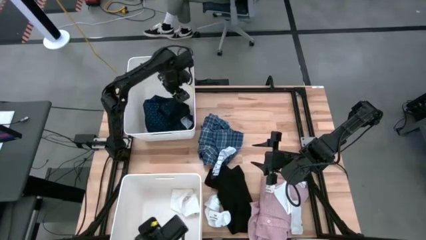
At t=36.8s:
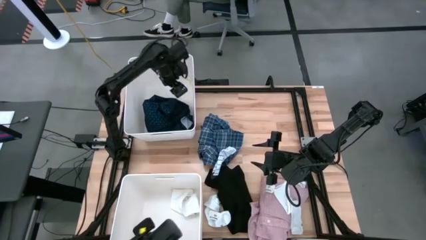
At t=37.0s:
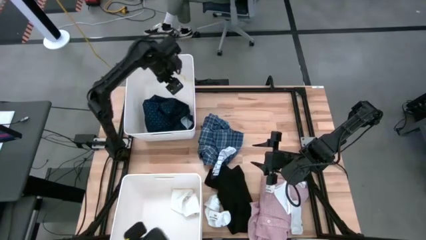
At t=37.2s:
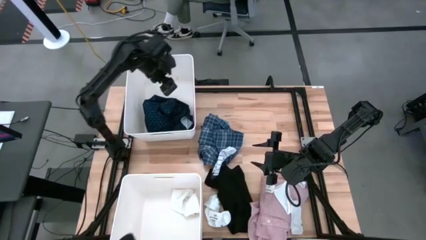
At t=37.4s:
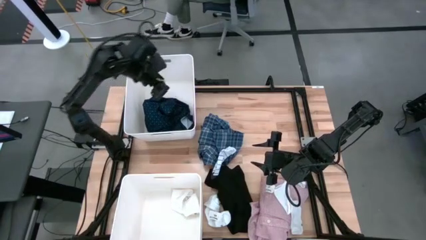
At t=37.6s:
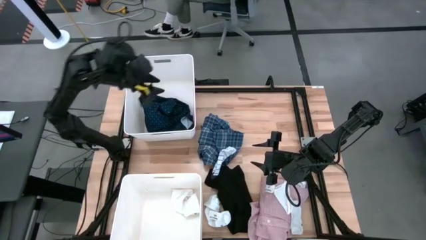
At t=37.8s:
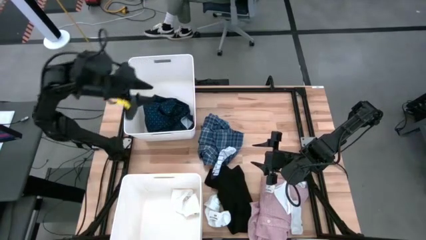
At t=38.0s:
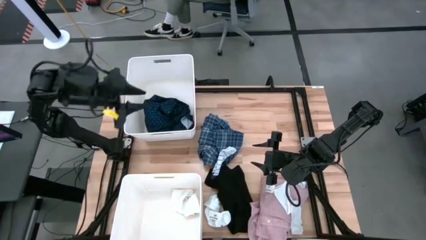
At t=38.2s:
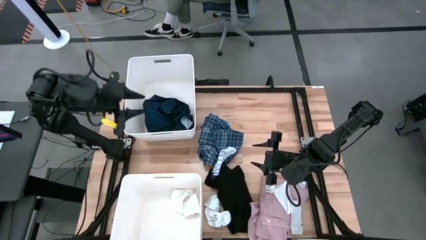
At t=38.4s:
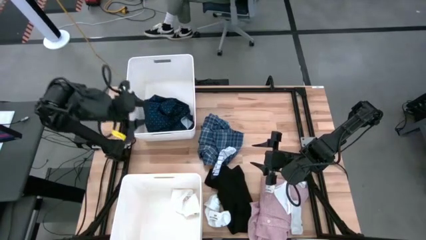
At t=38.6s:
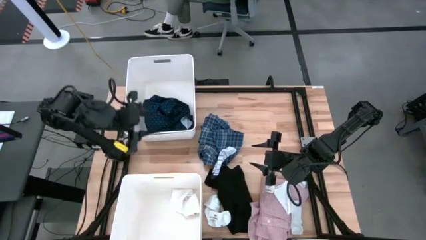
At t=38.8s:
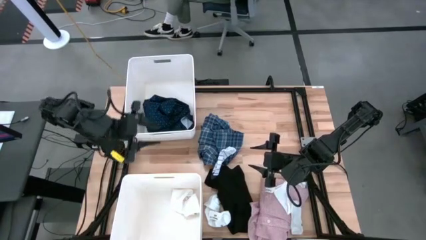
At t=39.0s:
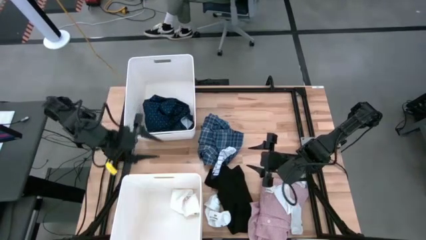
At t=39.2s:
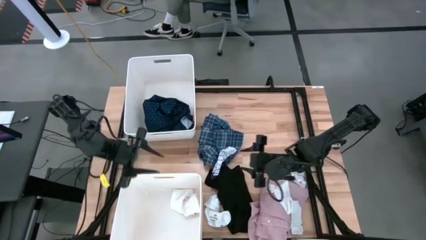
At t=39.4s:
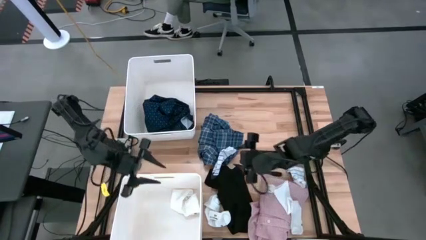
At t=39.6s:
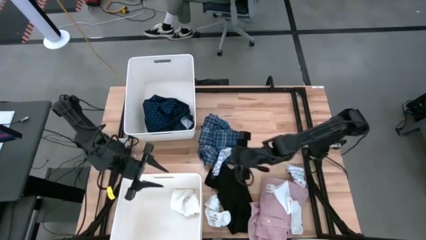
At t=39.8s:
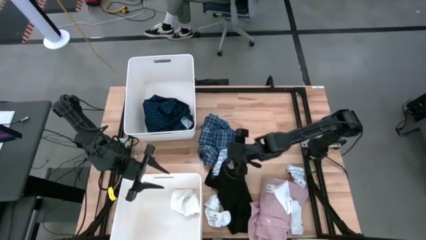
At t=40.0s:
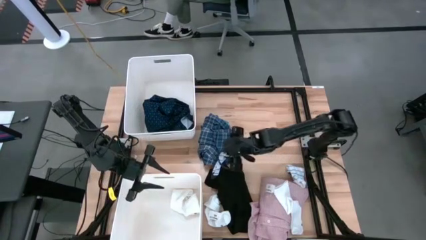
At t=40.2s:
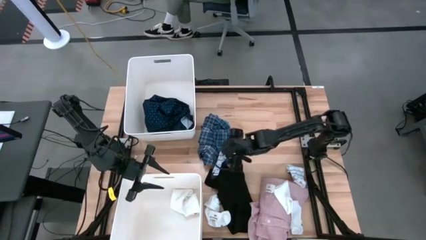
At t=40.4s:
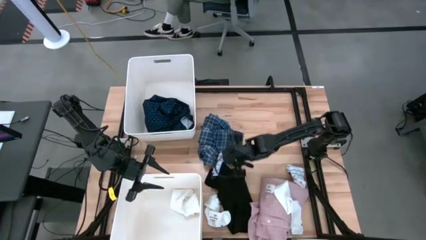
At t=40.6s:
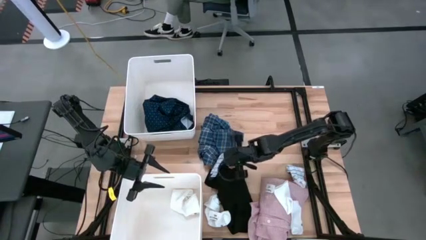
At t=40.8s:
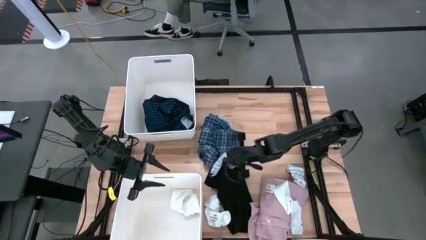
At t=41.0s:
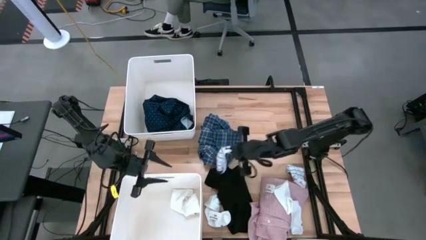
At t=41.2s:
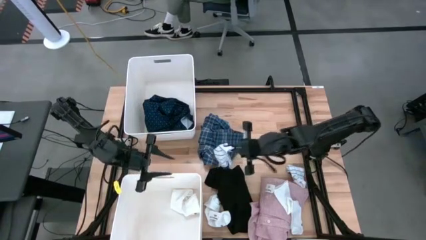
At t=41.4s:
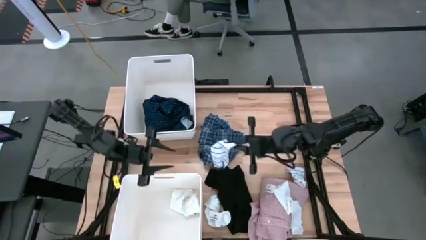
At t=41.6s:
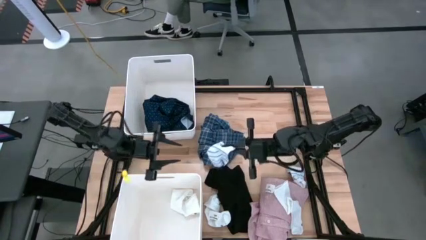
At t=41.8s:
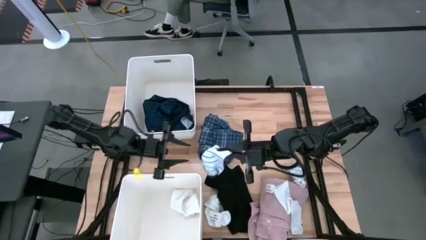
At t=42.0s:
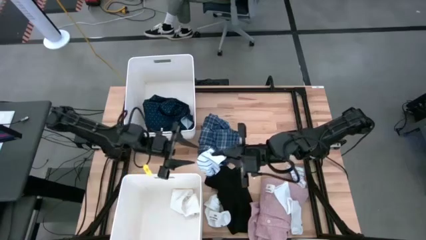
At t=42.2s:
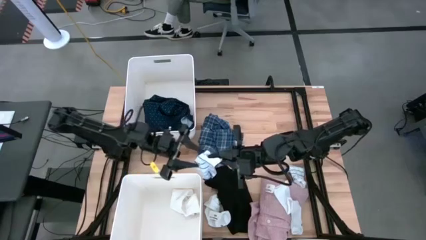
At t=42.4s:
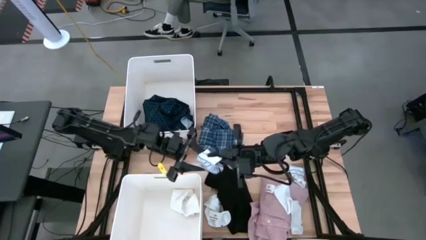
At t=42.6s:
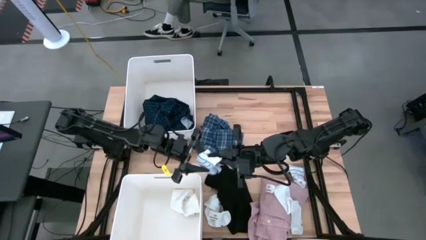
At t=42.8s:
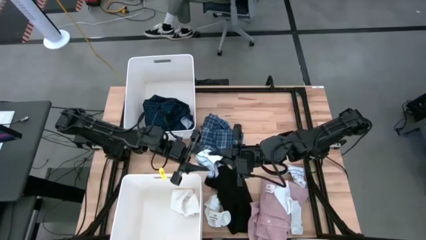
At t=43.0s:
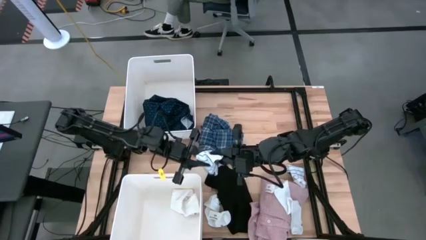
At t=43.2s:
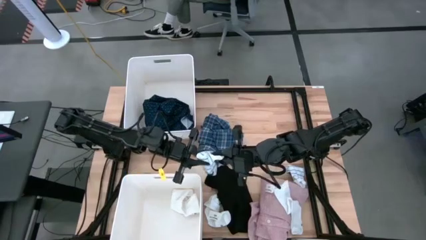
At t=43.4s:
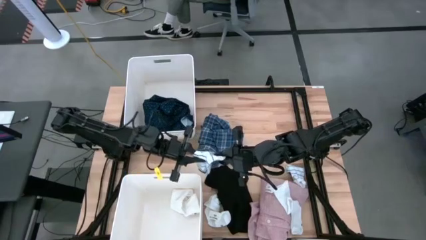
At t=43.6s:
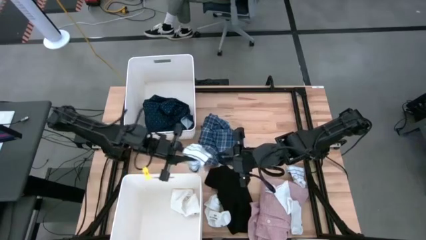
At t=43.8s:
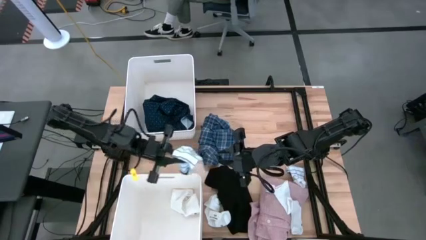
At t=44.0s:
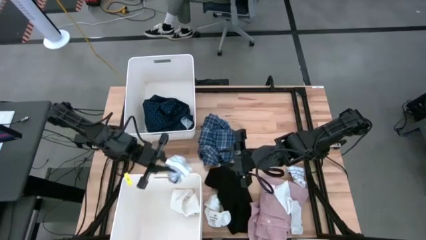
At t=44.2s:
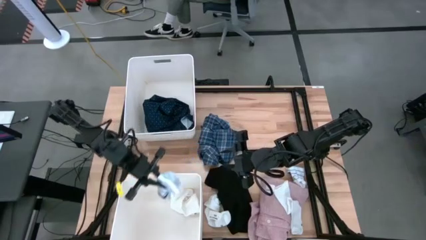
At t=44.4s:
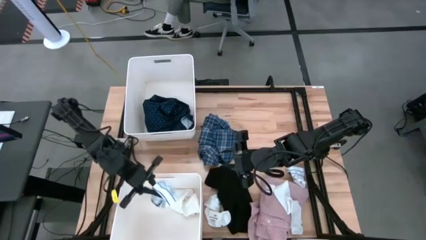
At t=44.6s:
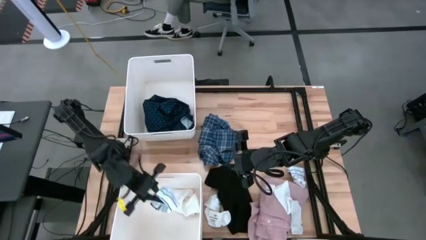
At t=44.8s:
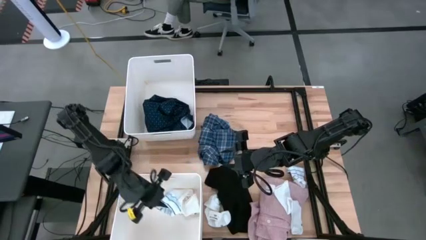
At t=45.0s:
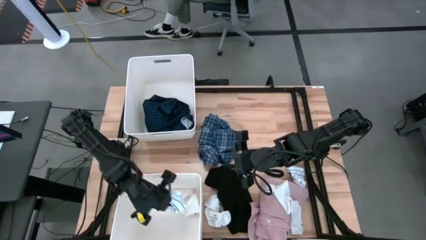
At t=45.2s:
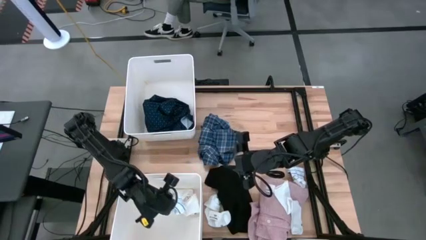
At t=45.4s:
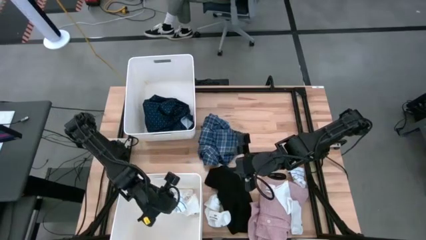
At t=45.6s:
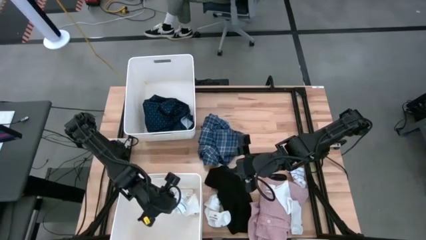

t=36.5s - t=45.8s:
Task: Sort clothes
Put the left white striped sock into the bottom white laundry organizer

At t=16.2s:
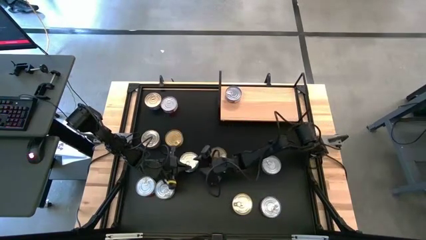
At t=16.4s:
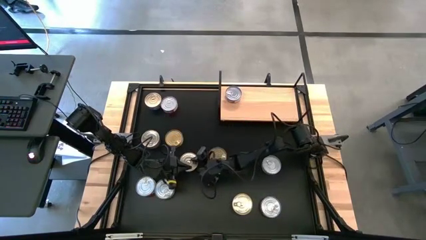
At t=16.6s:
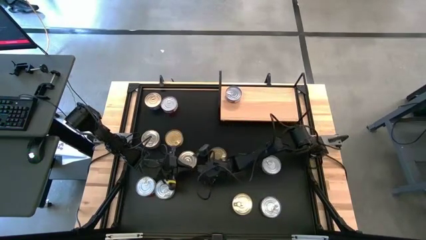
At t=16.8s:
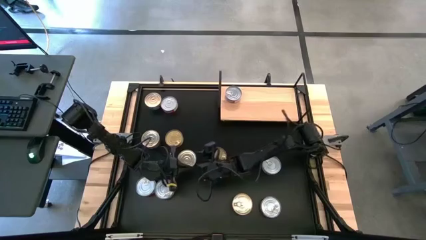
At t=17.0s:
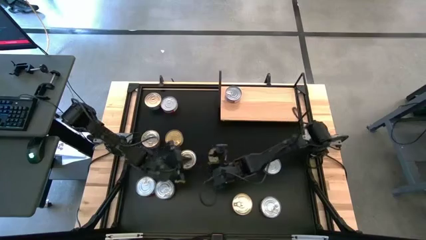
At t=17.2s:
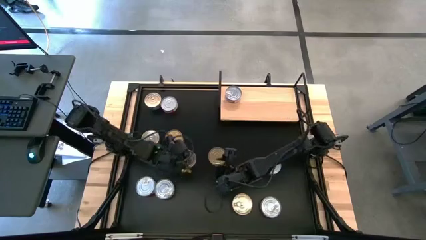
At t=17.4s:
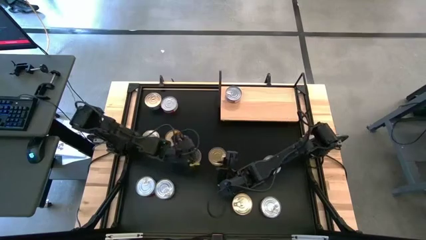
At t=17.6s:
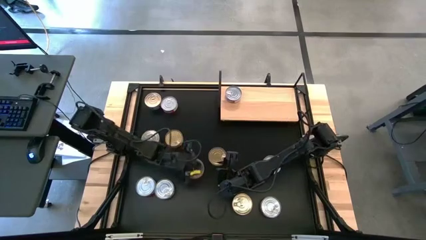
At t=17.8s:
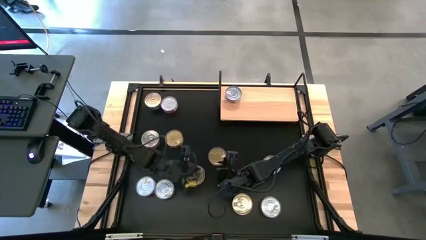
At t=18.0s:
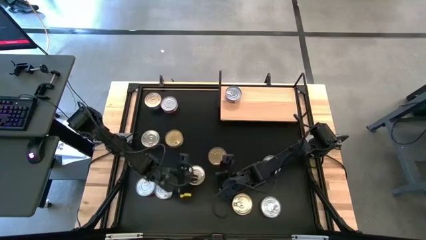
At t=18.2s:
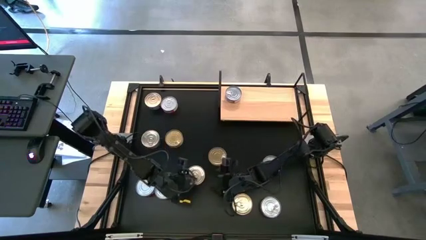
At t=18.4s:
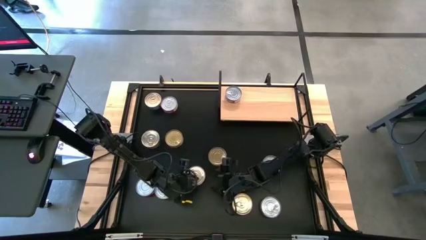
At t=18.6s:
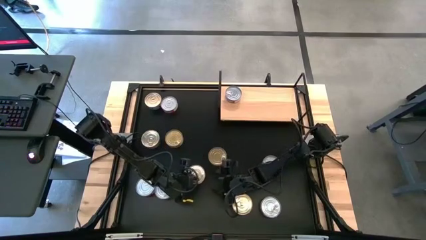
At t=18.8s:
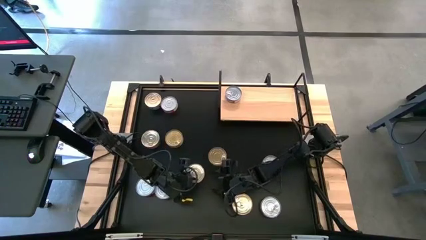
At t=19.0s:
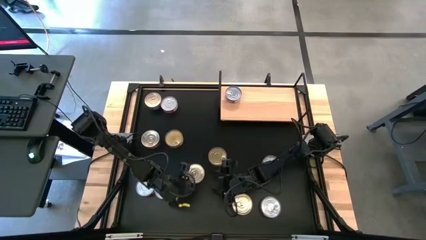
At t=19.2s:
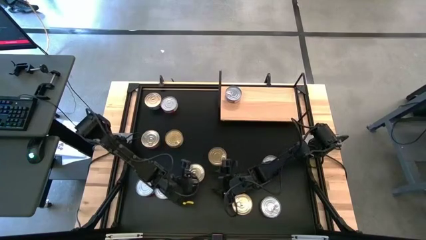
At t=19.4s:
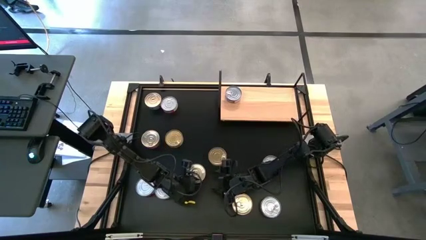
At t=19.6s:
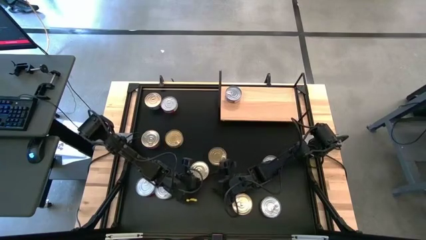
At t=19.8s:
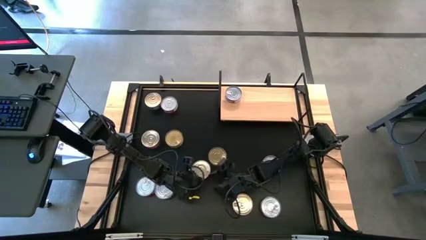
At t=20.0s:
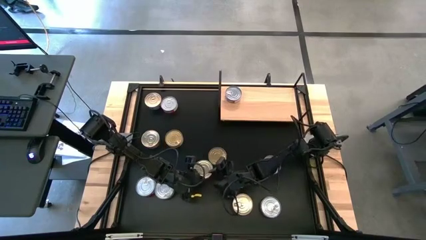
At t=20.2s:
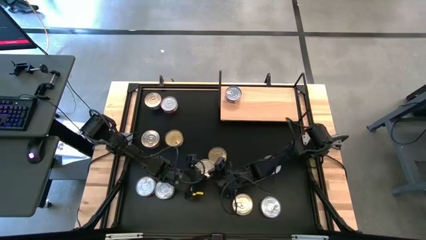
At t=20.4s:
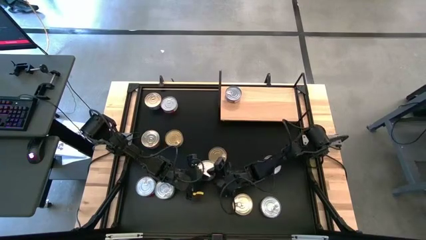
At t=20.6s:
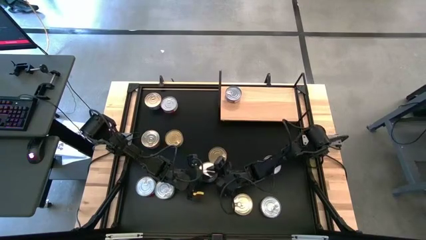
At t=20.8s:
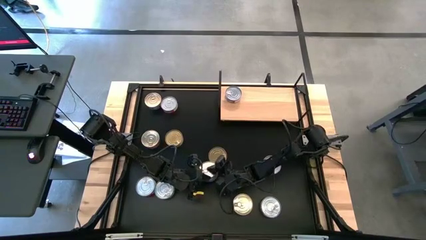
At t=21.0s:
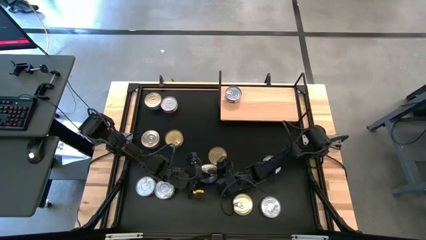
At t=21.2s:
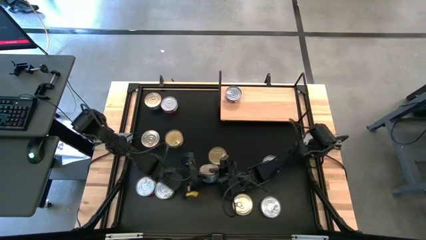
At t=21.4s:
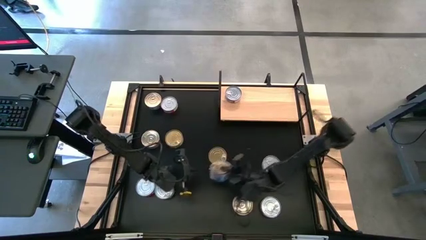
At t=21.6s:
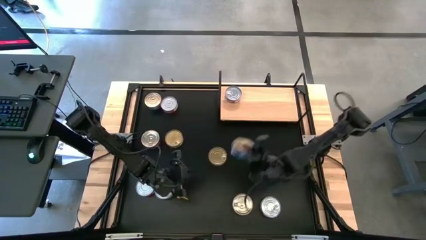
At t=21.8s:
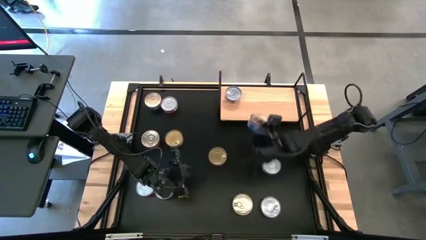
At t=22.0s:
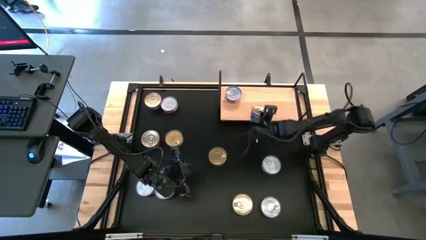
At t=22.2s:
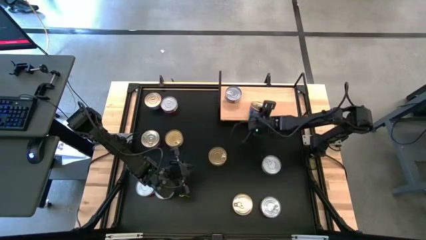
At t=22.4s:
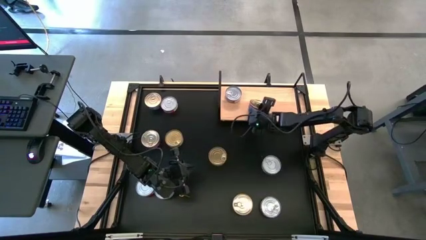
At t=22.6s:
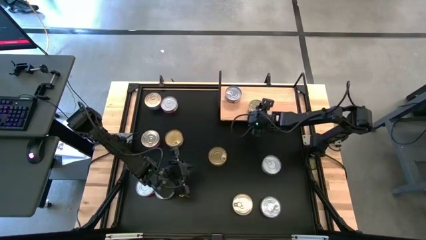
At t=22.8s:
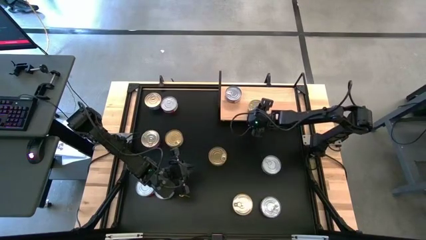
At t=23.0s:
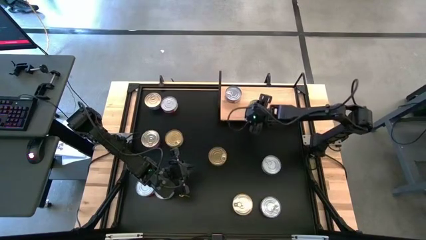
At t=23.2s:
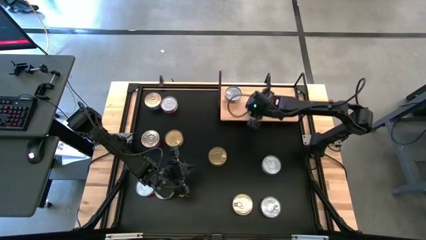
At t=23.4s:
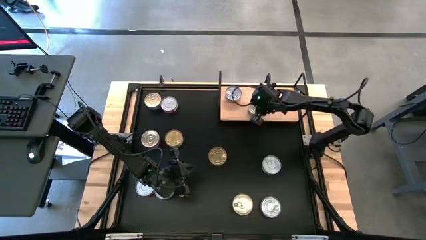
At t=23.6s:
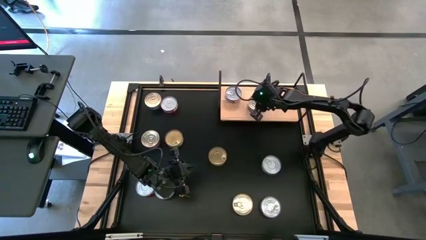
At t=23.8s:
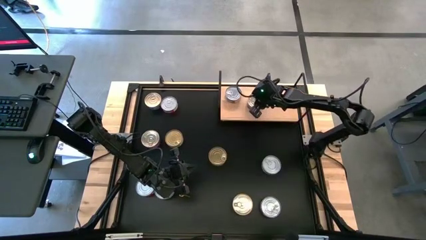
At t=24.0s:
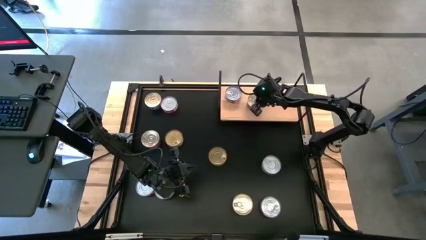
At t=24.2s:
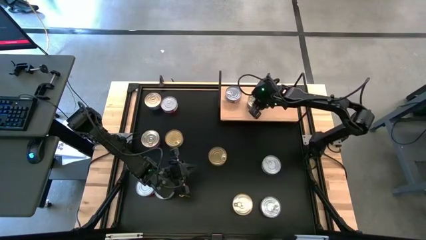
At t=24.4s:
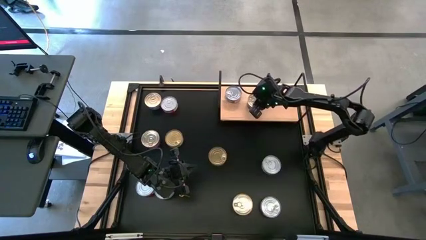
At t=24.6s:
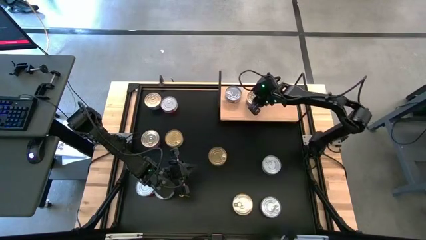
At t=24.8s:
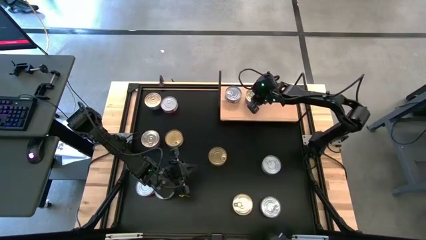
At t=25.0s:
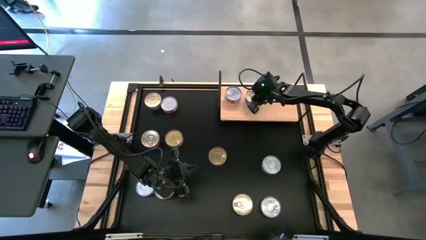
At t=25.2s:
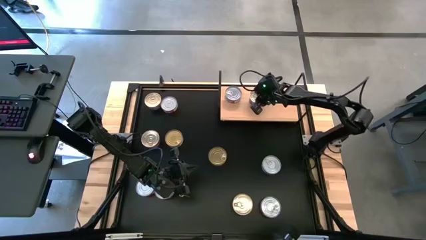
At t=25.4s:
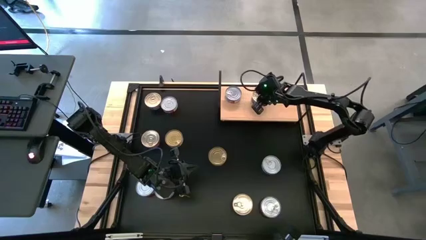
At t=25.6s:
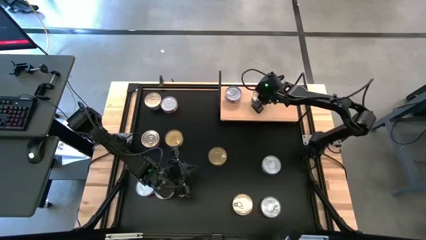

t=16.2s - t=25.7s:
Task: Stack canned seafood by type on shelf
Put the blue-pink tuna can on the shelf
